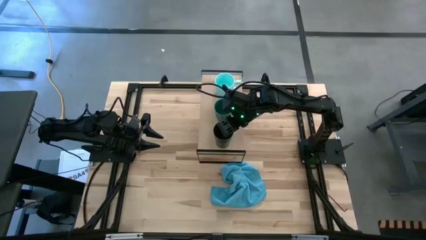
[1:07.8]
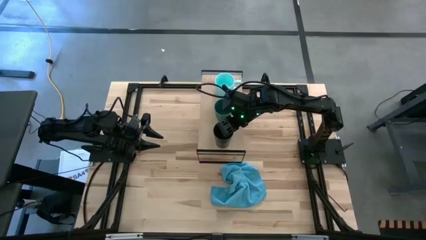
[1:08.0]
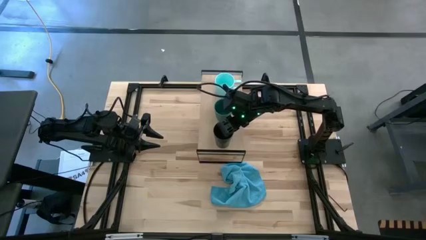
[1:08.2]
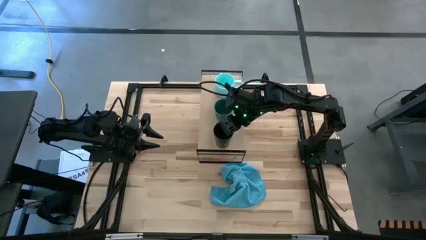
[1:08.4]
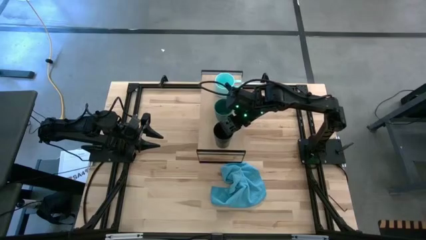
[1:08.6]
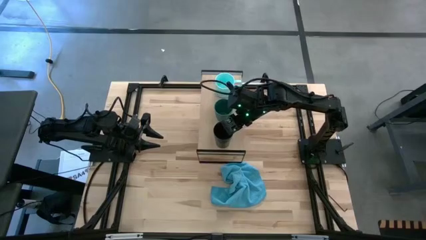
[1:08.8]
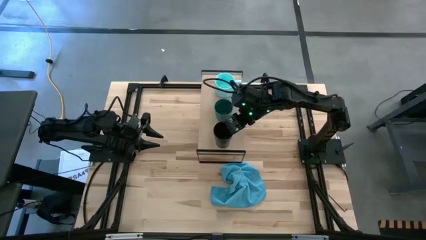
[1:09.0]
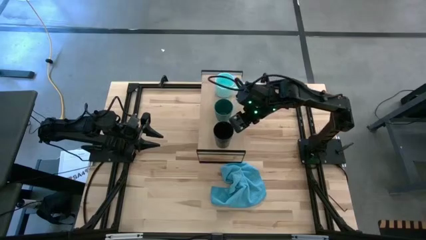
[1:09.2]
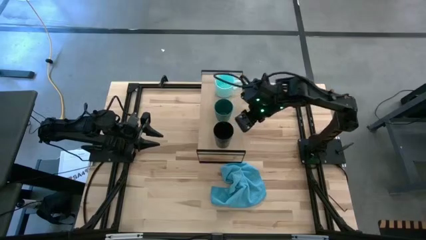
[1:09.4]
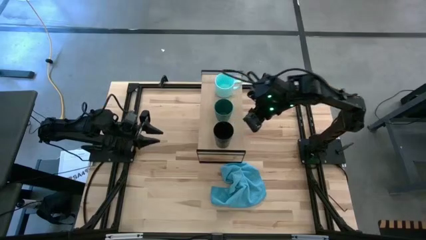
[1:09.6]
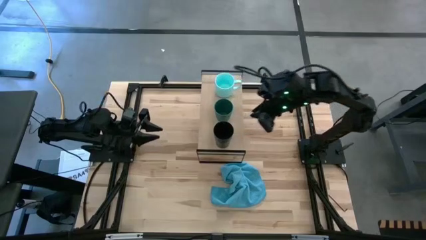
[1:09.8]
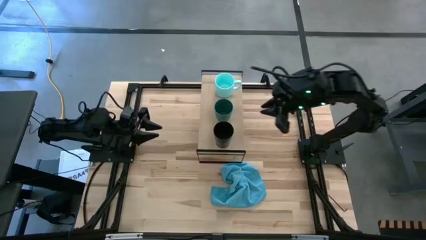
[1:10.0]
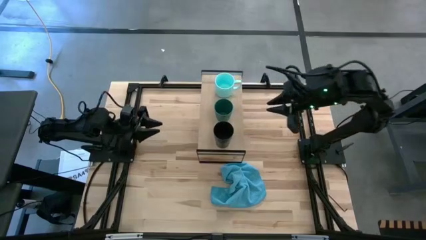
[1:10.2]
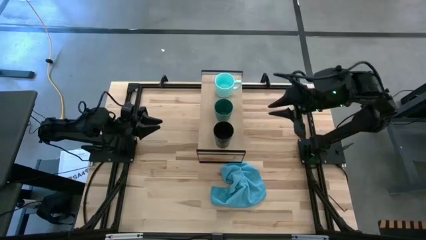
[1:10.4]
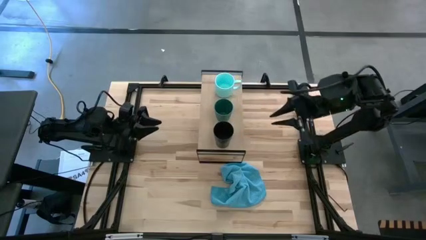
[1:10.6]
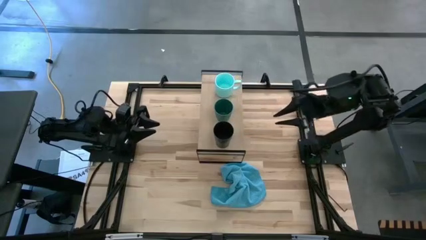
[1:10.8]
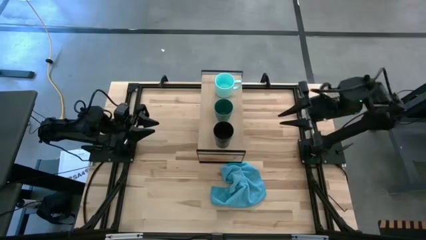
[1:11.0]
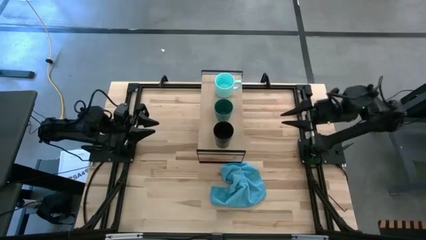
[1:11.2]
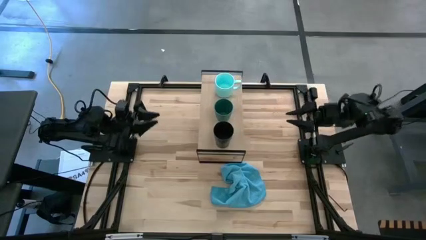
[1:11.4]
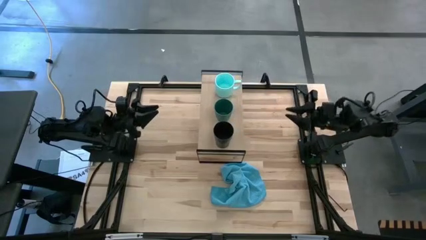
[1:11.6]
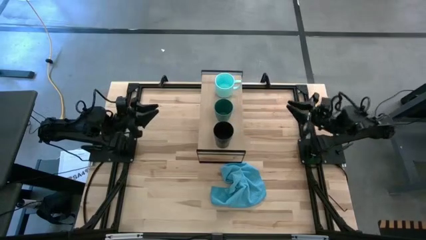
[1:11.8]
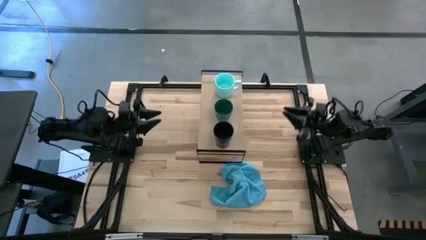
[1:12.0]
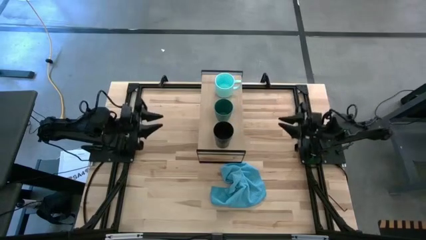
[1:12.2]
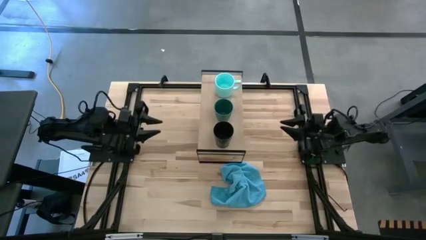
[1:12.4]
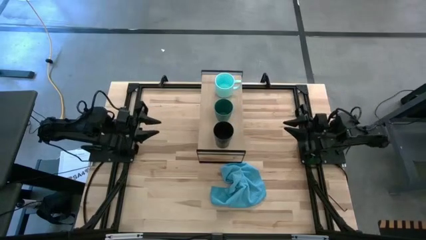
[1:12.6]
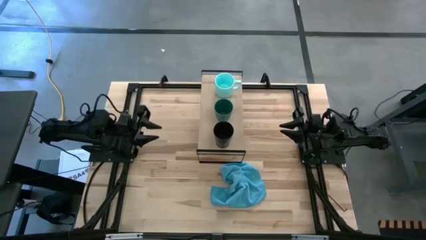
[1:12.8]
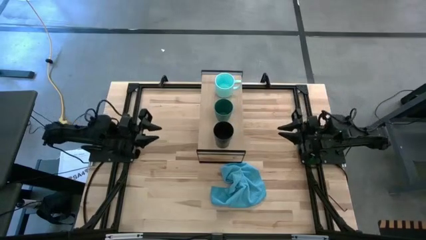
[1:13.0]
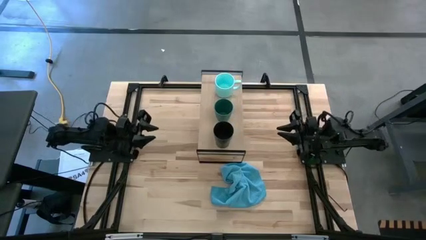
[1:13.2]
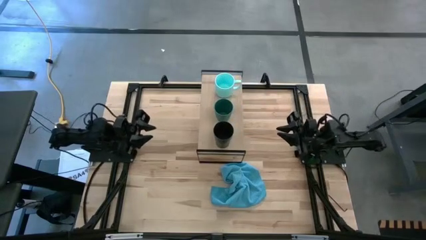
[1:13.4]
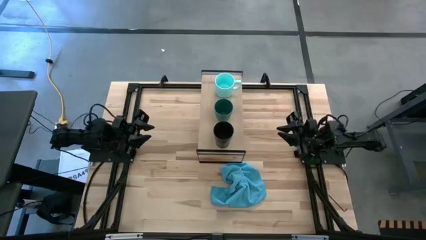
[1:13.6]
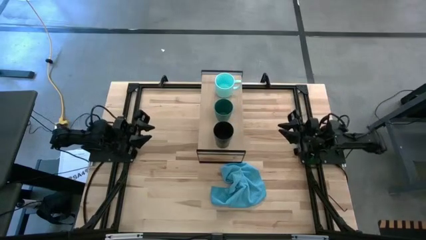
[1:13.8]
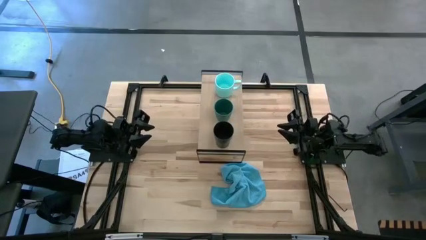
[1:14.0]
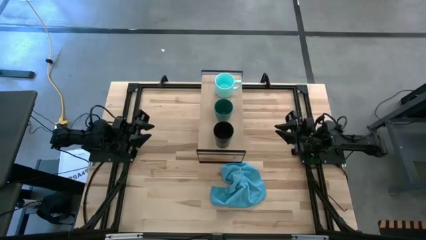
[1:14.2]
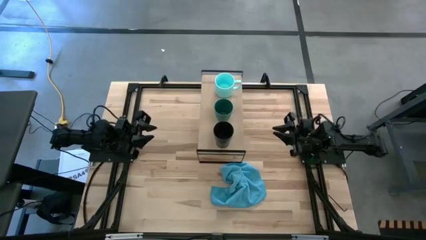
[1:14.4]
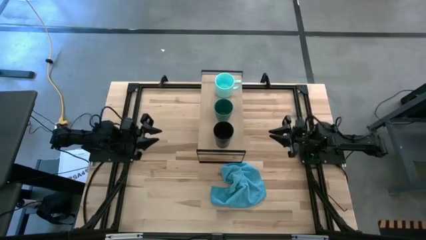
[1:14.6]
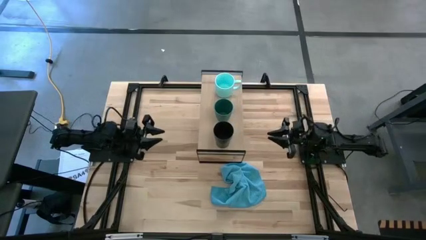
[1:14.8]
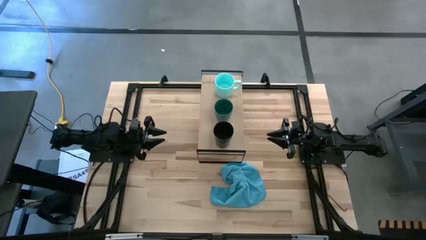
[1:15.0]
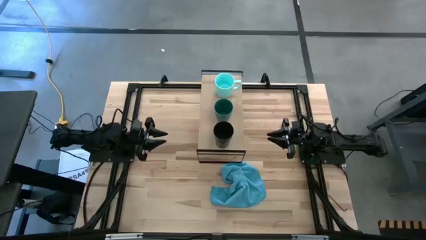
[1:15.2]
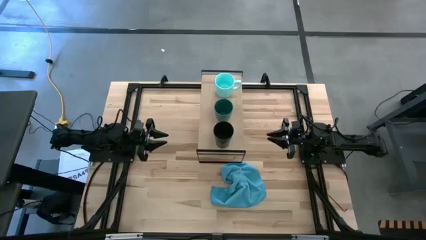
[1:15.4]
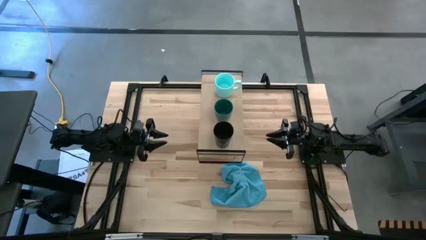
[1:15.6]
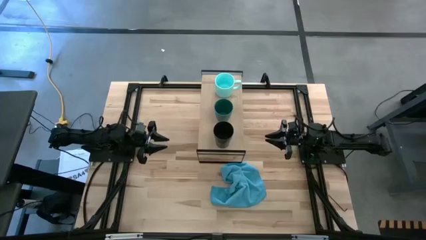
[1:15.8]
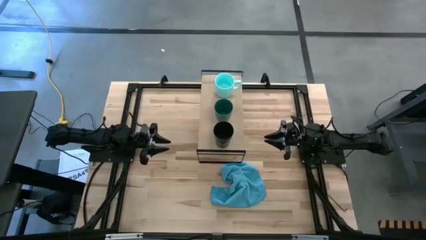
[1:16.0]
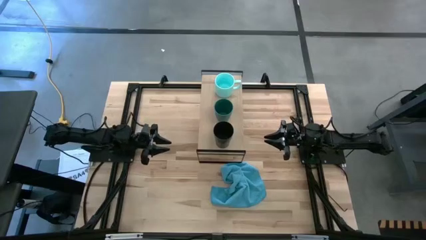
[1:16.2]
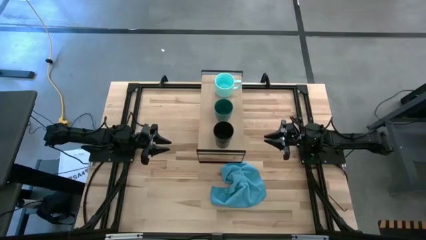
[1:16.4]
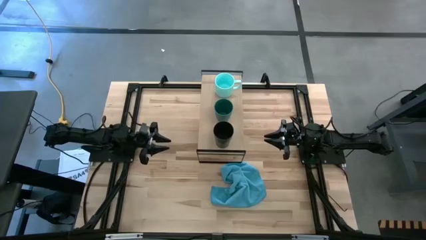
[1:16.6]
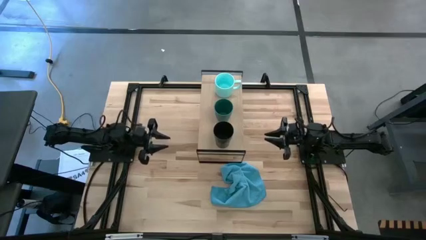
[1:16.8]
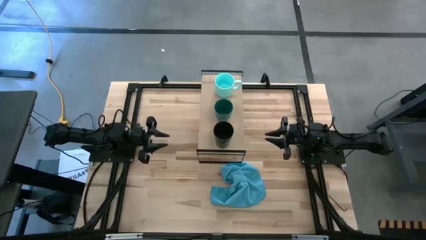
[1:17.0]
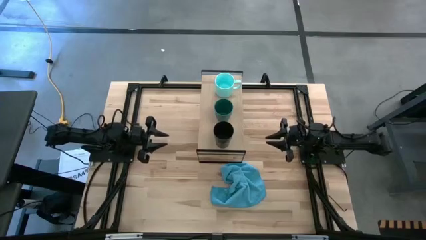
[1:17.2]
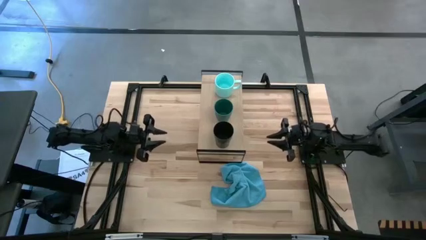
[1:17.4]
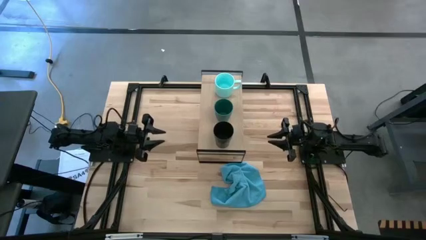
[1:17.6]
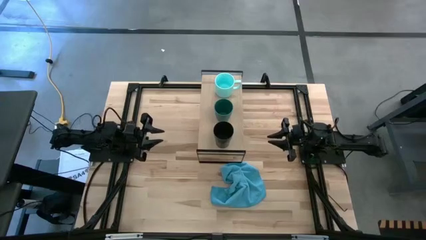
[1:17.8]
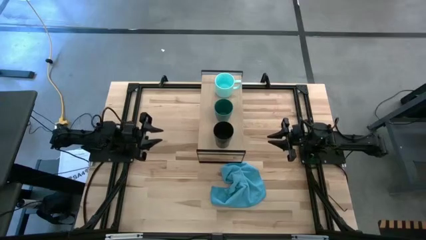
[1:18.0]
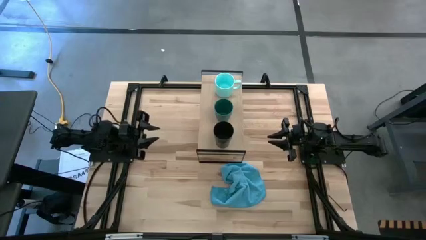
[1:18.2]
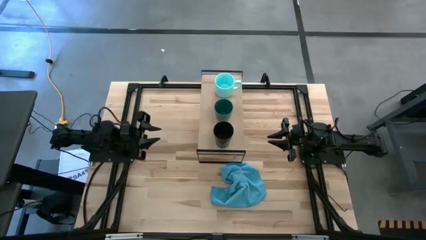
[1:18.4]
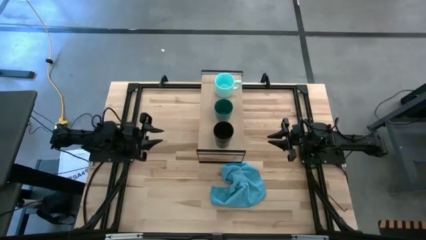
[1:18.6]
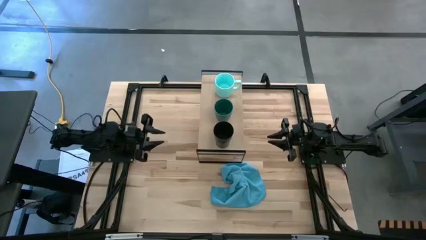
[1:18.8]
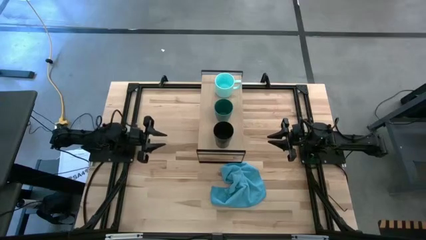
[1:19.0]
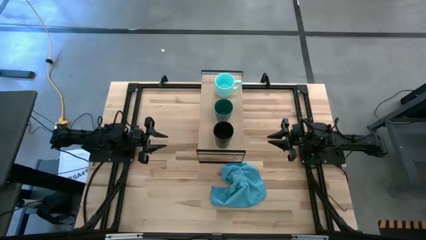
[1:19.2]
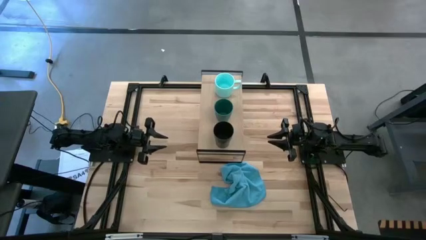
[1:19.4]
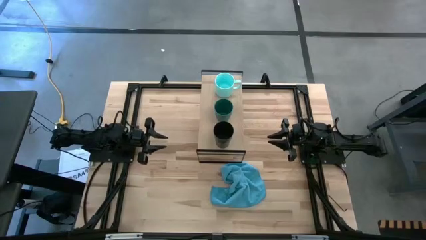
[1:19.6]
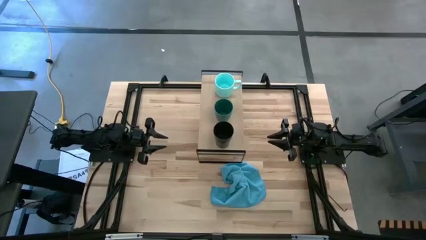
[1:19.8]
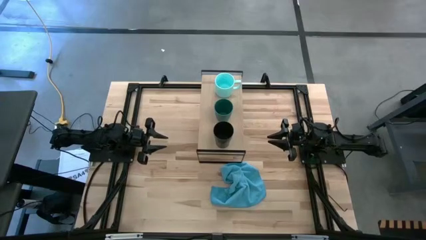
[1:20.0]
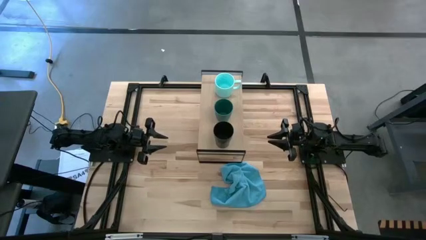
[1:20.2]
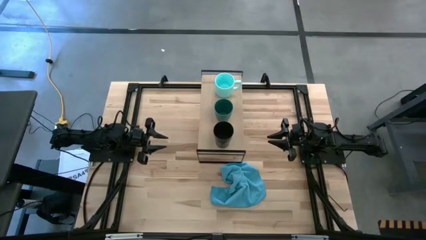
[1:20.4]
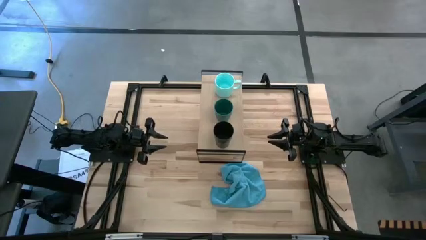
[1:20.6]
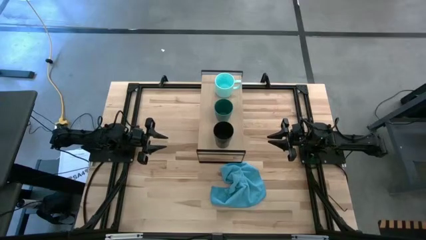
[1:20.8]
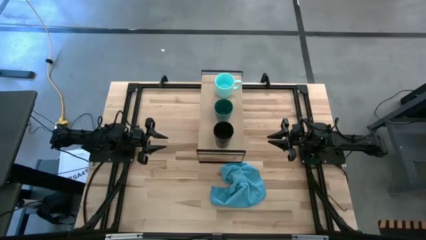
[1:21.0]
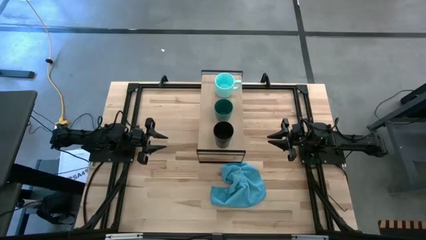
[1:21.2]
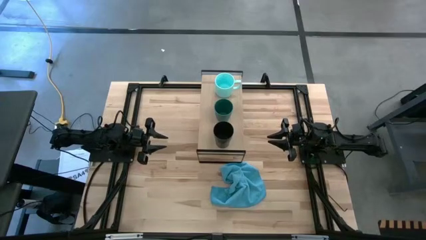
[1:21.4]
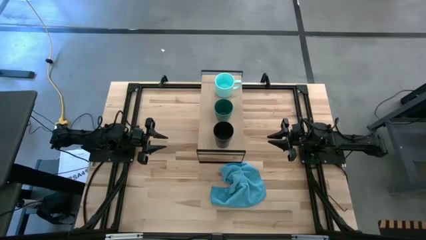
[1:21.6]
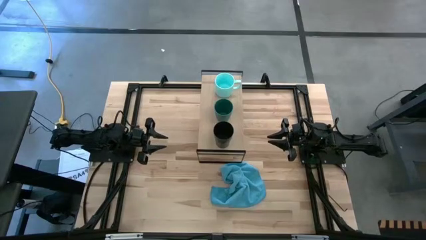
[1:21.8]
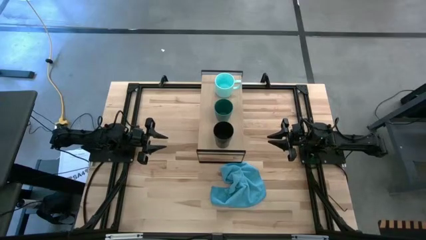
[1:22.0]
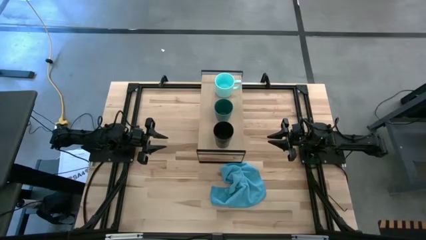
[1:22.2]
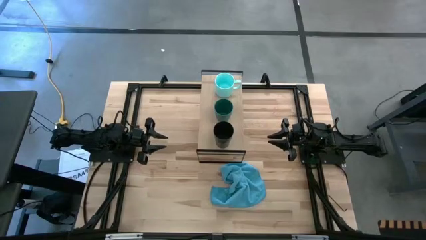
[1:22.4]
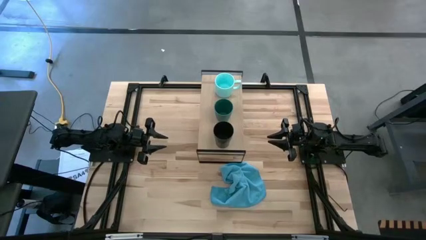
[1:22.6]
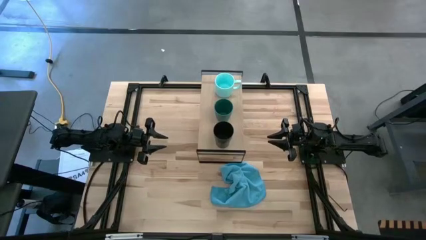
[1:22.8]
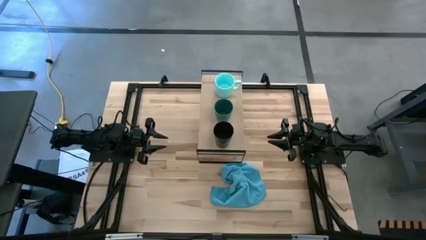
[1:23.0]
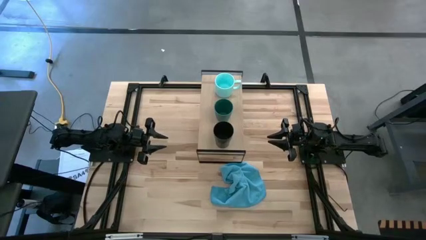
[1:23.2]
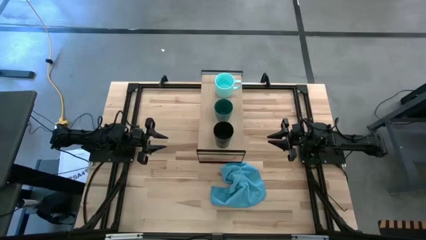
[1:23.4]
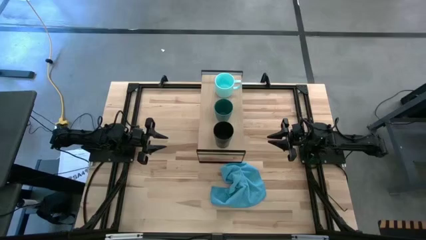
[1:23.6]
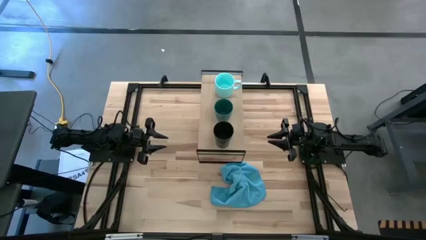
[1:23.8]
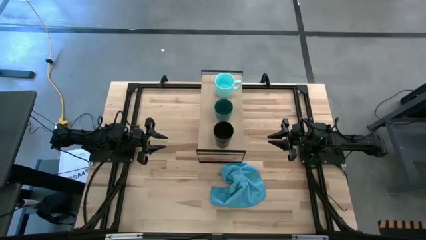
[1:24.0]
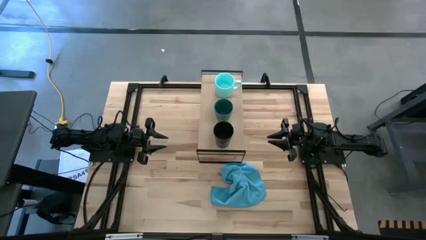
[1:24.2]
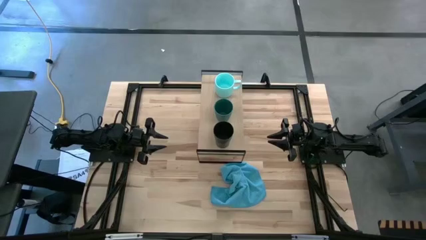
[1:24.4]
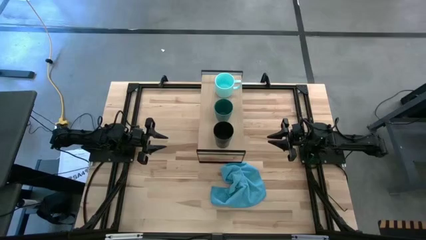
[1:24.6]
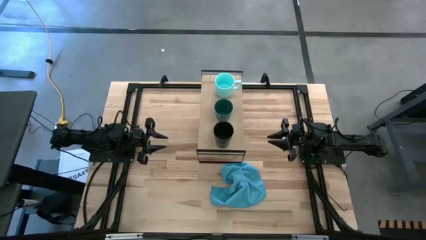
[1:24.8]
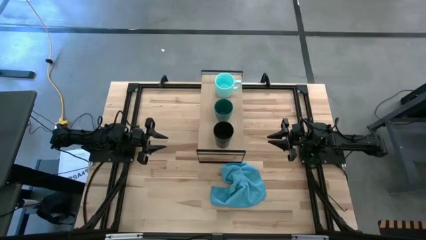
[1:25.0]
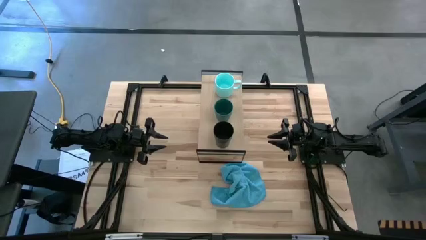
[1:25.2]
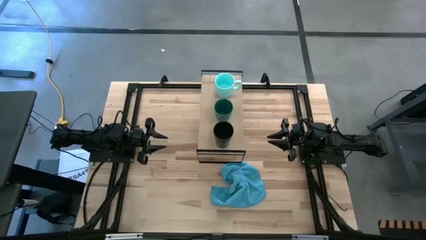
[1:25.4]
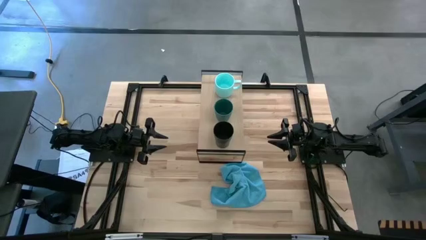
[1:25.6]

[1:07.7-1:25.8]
Task: Stack small to large cups/mugs on shelf
Return to Home Position
